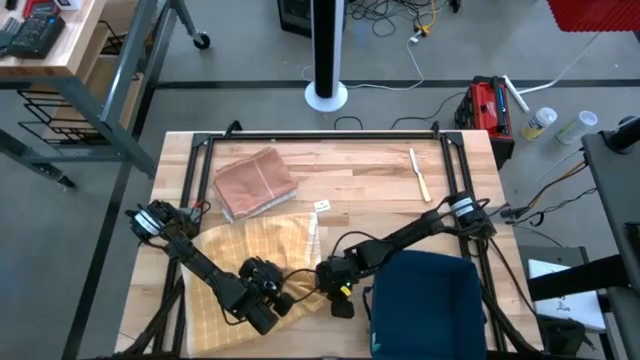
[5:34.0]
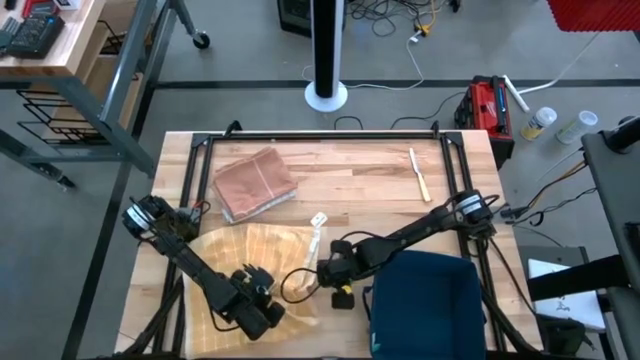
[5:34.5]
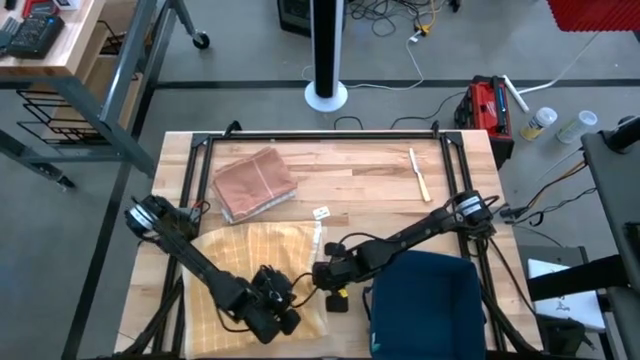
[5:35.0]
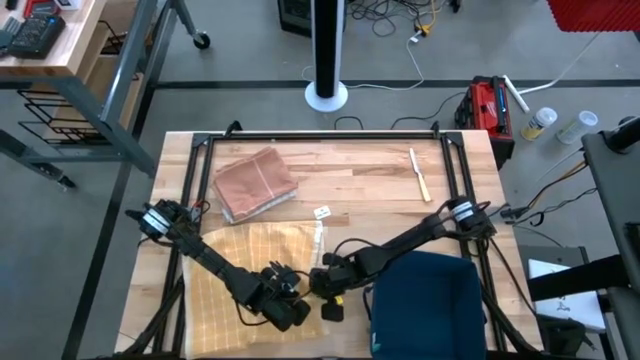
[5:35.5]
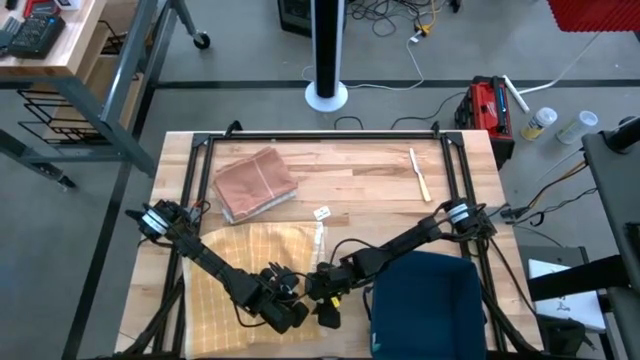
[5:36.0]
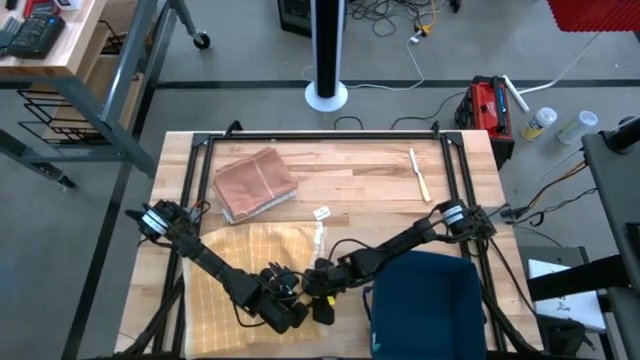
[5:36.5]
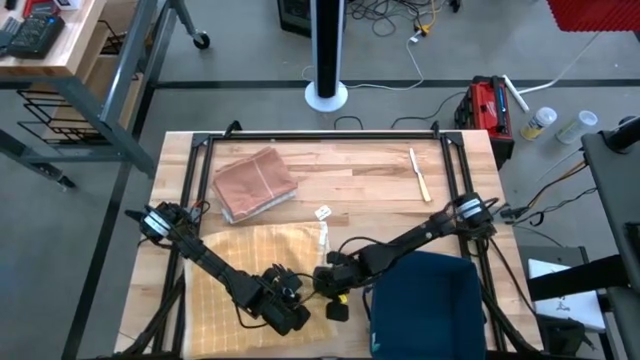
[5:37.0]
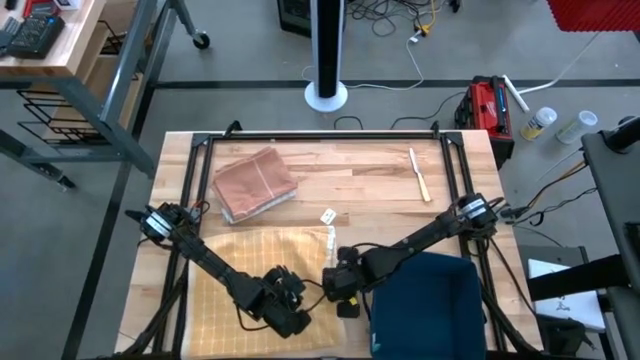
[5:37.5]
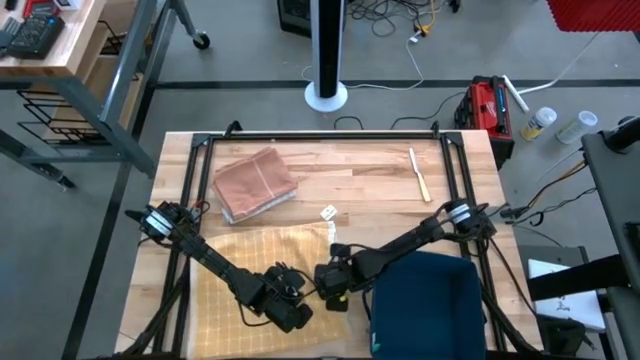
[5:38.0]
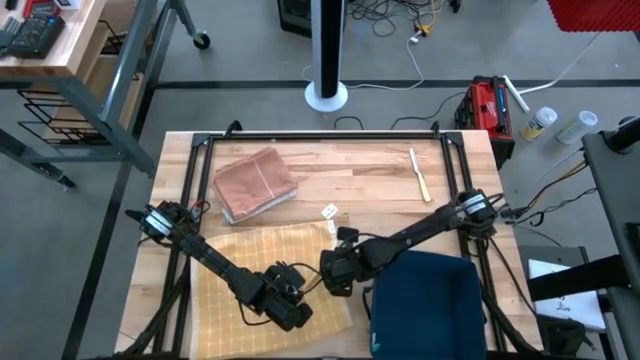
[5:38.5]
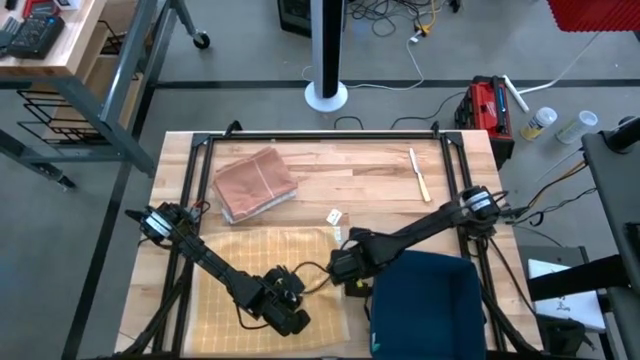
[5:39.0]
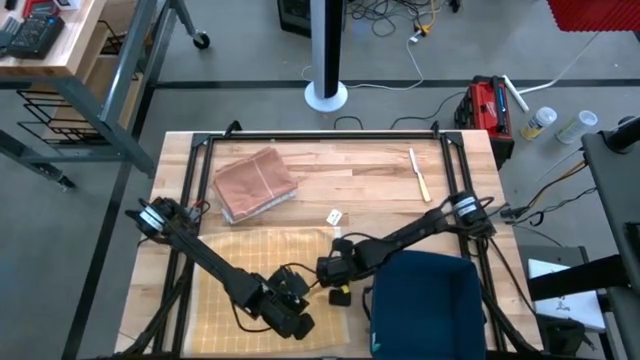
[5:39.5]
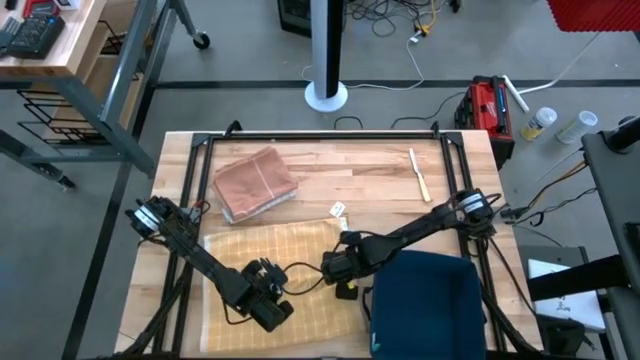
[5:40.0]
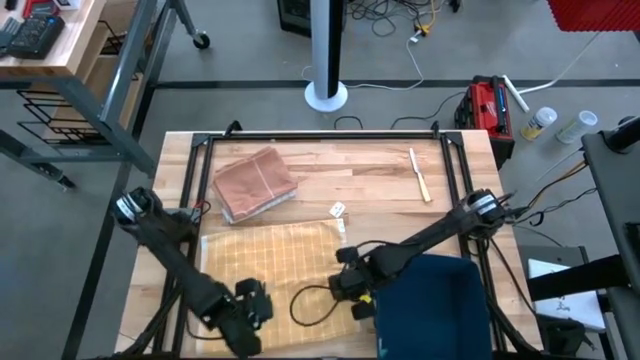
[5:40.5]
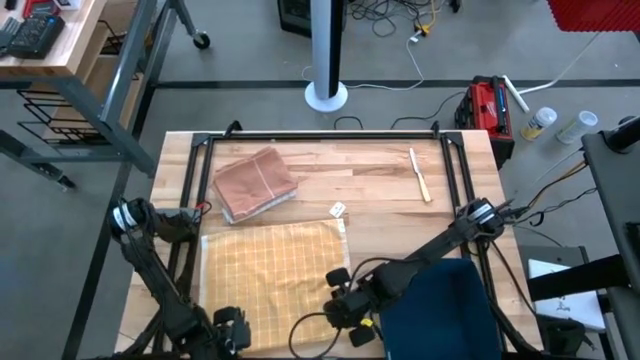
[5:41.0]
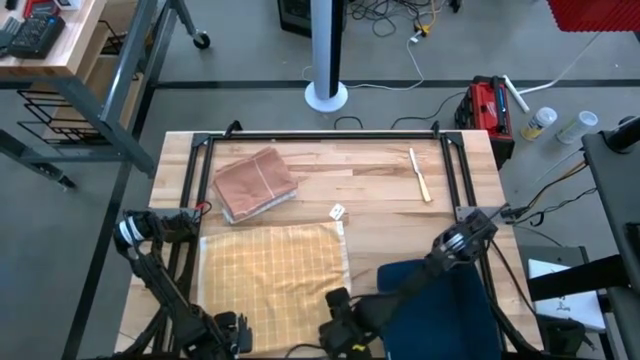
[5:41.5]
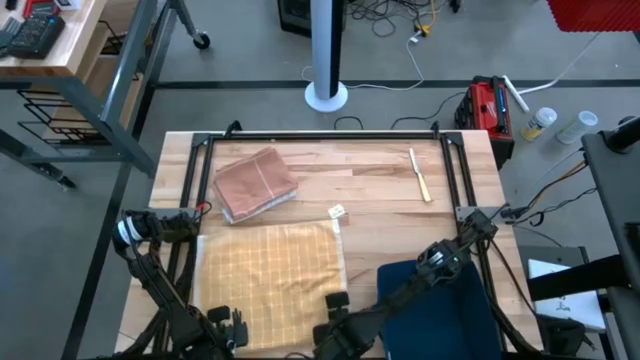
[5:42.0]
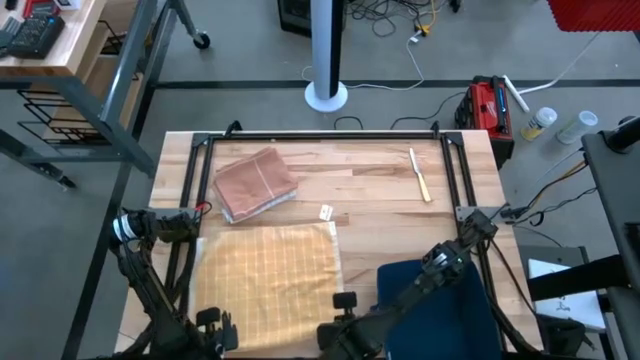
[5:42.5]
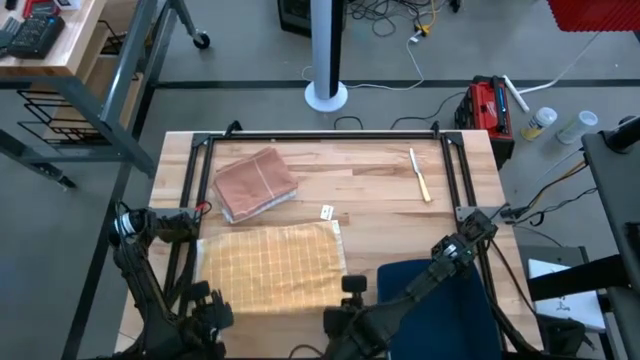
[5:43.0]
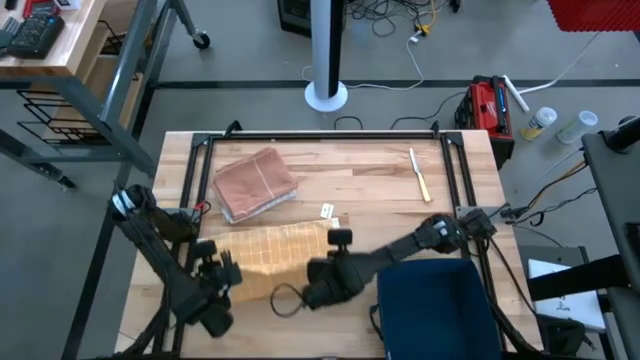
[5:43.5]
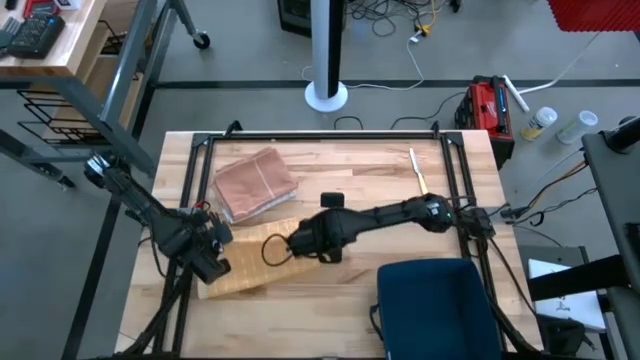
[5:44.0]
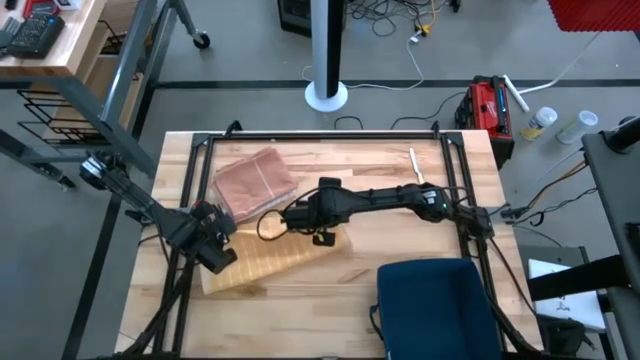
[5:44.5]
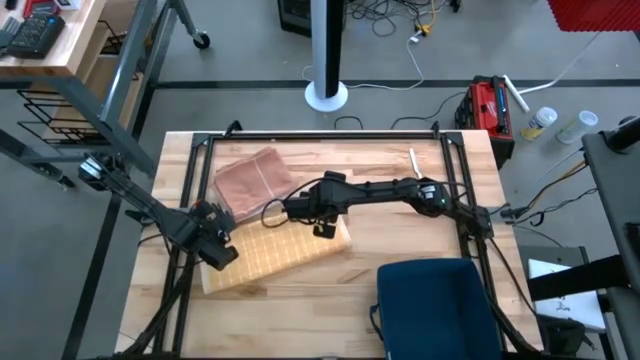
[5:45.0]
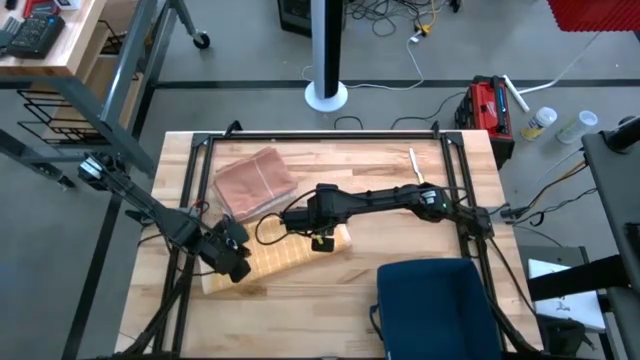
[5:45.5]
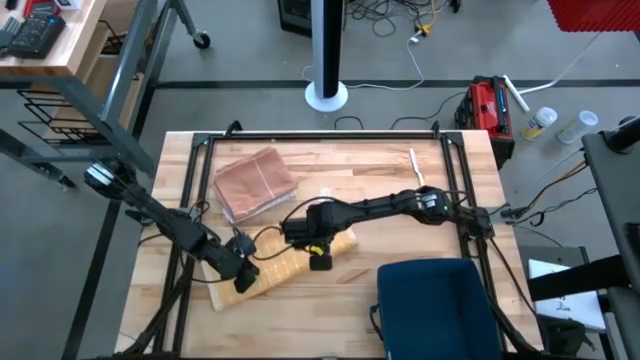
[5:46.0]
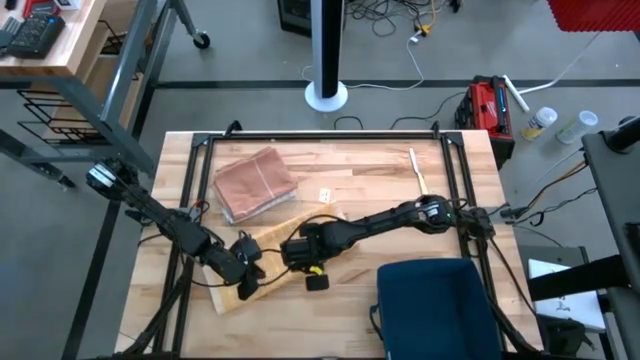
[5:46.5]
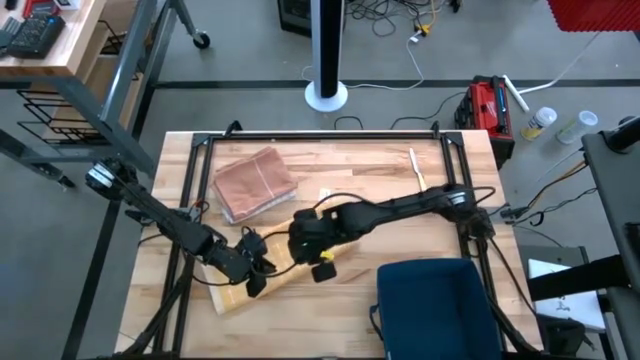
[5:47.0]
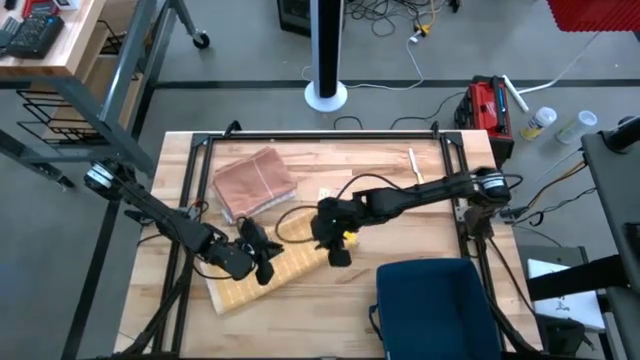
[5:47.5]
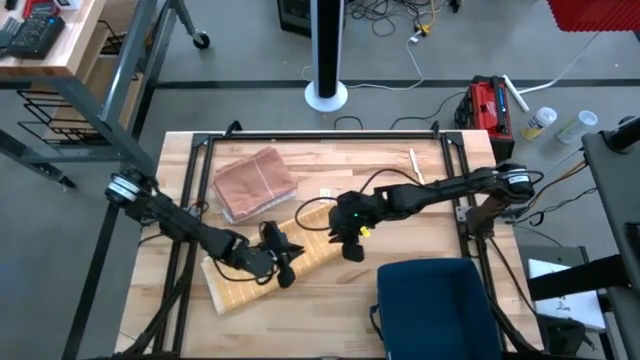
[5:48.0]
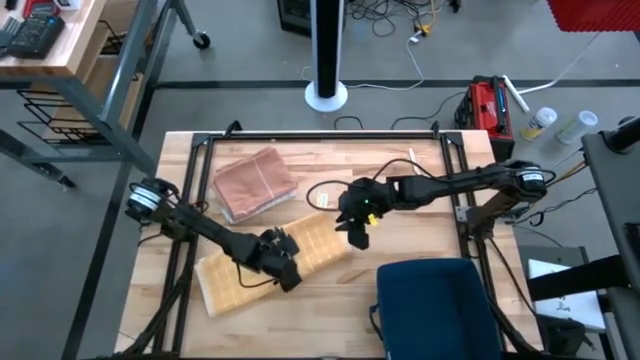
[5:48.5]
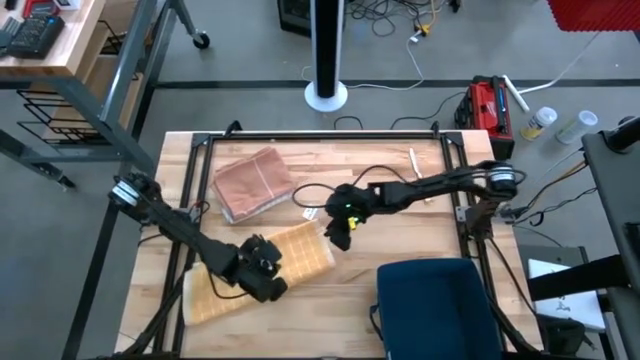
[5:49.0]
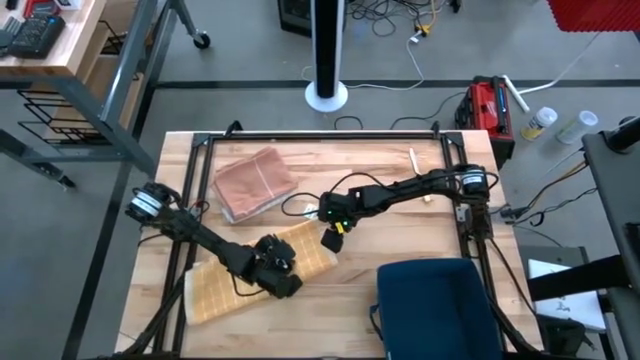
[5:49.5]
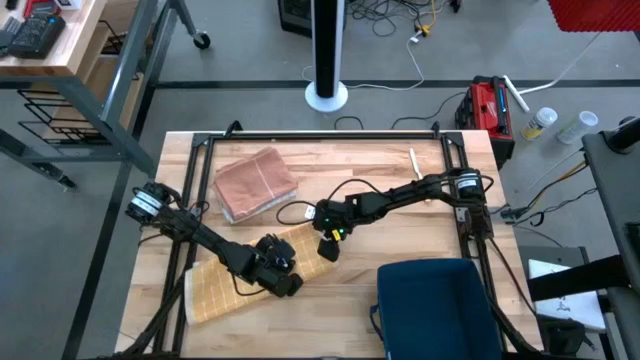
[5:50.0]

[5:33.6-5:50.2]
Task: Fold towel
Fold the yellow towel

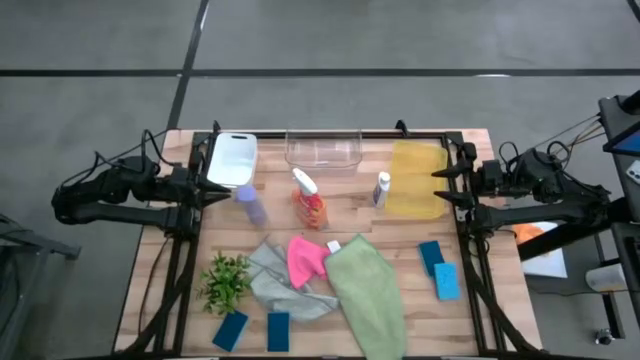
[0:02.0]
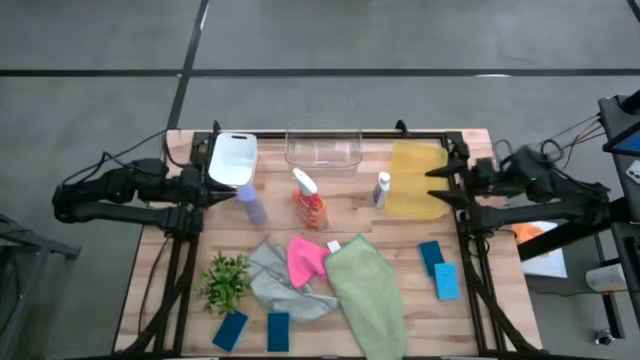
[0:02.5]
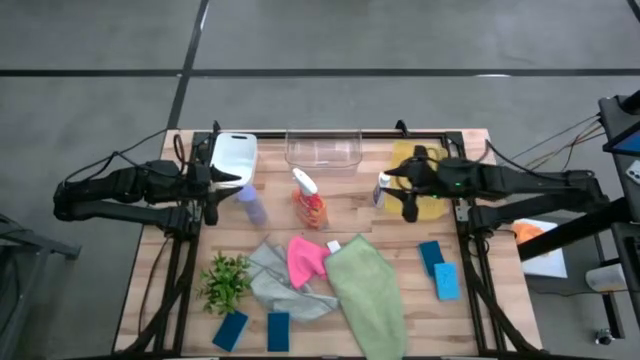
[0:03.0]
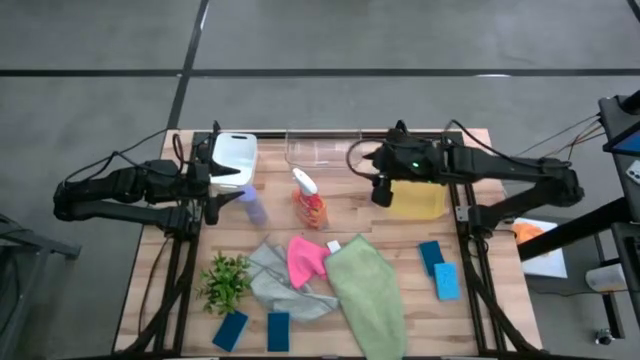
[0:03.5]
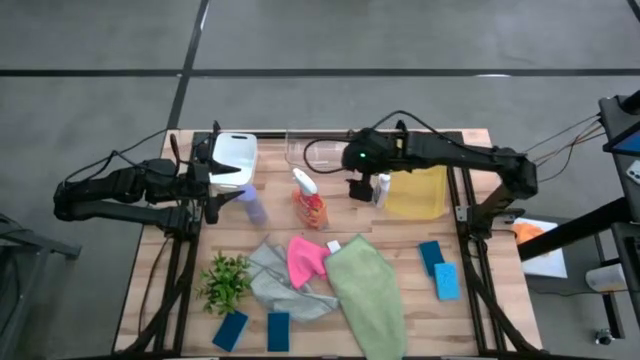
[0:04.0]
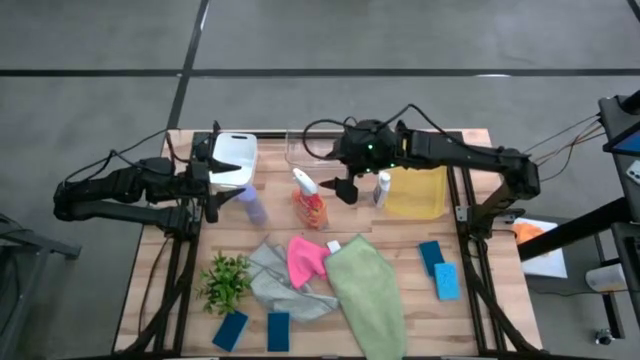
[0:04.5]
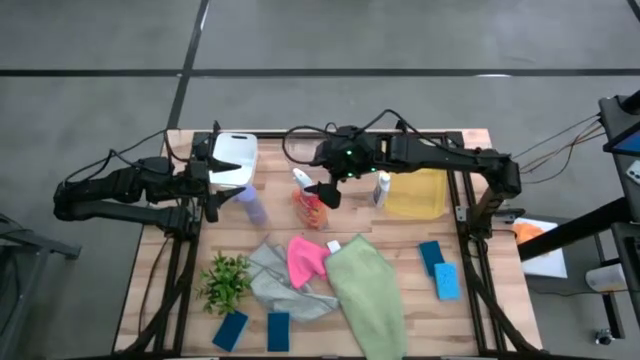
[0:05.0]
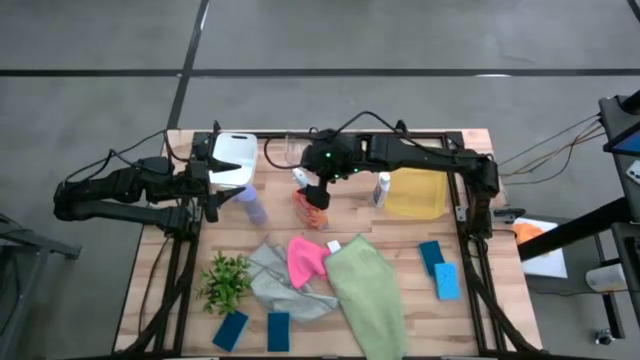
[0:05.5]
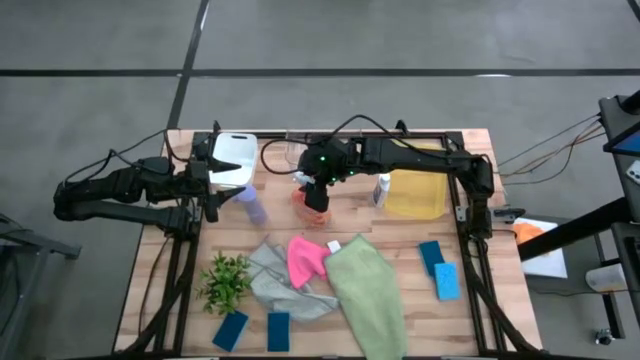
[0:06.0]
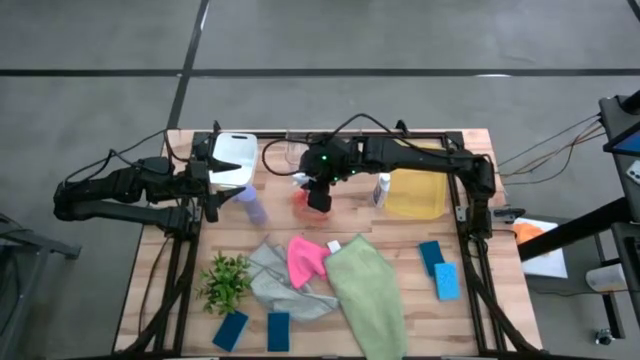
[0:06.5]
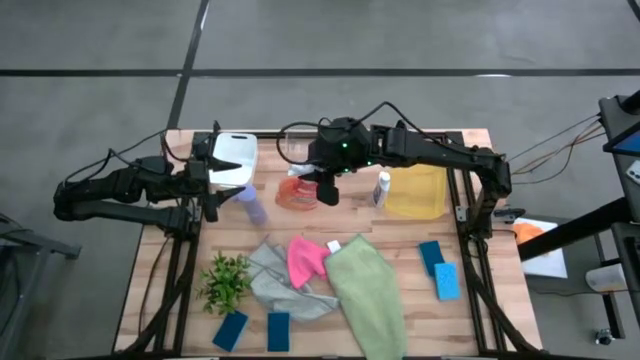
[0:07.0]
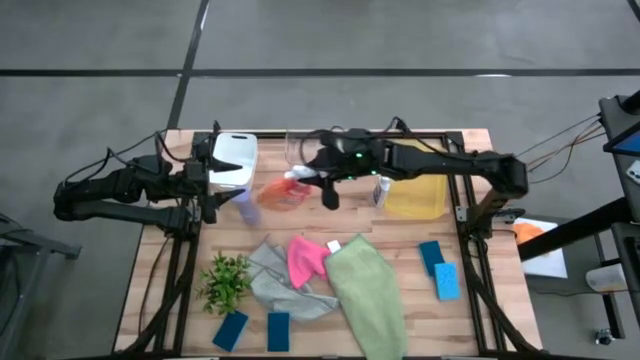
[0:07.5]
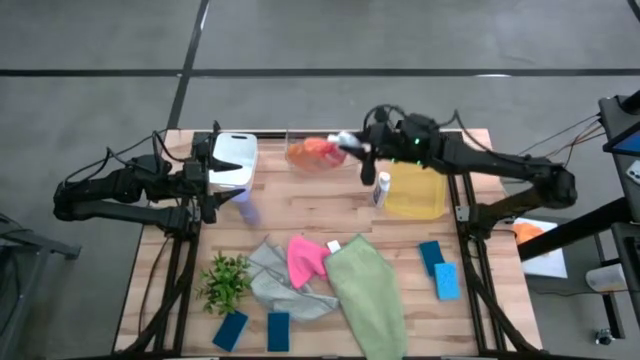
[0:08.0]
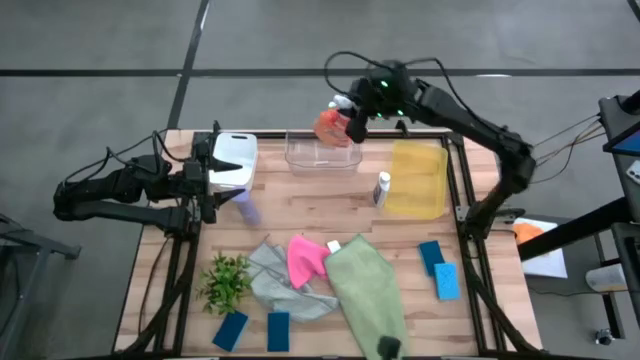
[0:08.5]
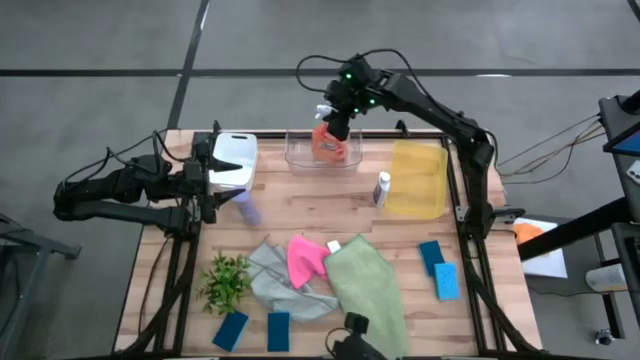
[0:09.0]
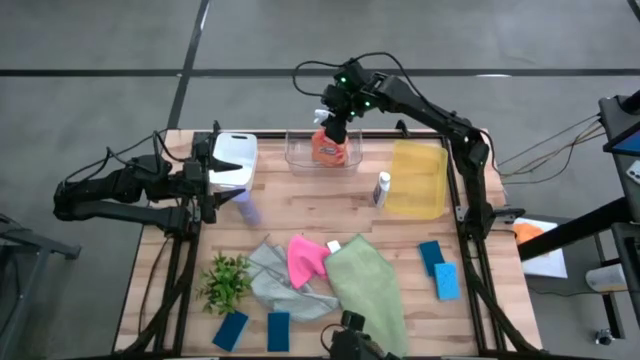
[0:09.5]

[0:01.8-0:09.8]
Task: Pick & Place Kitchen Items
Put the orange spray bottle into the transparent bin
